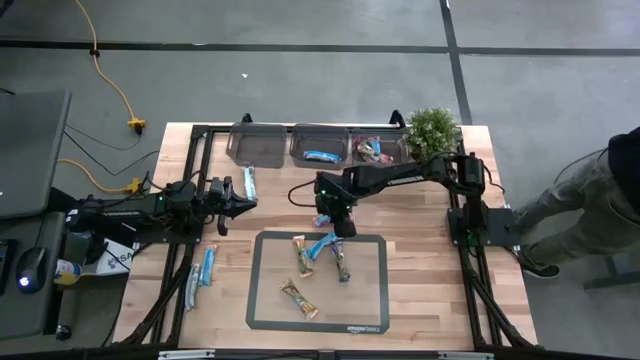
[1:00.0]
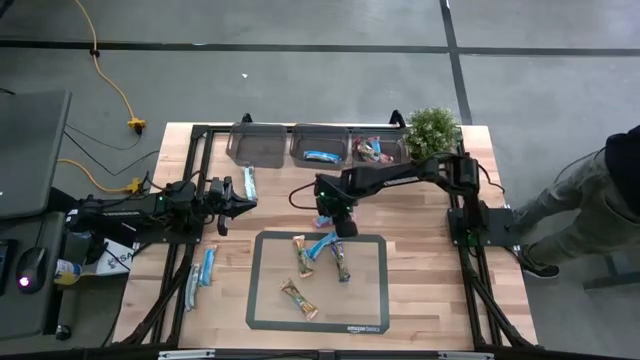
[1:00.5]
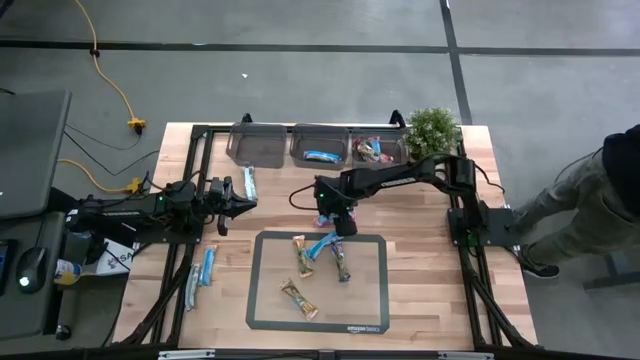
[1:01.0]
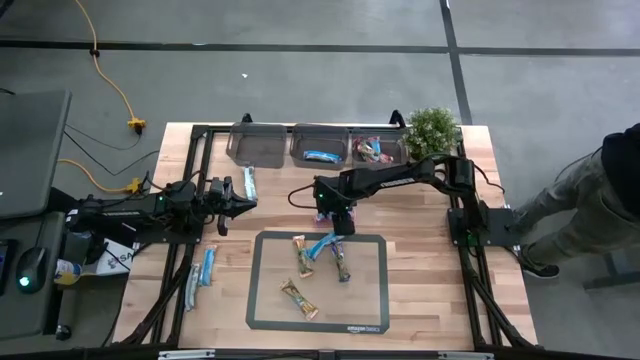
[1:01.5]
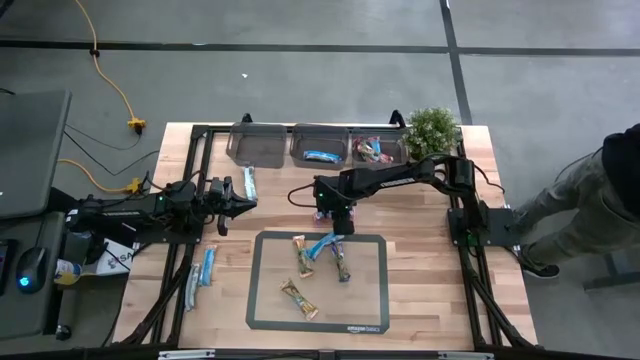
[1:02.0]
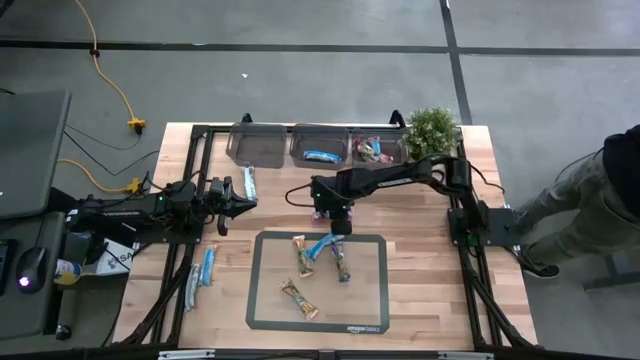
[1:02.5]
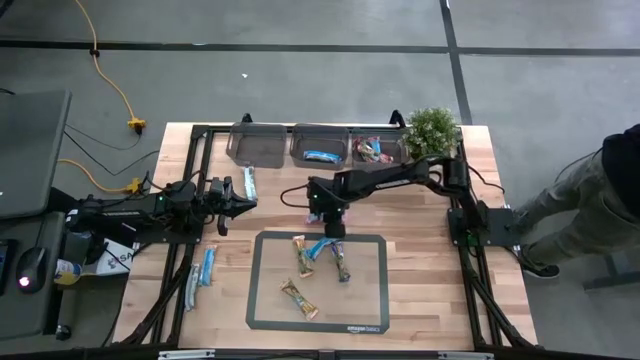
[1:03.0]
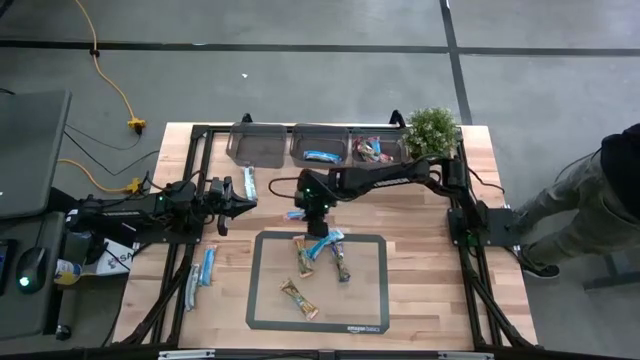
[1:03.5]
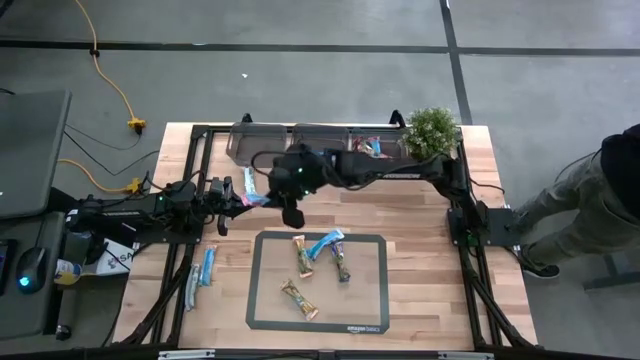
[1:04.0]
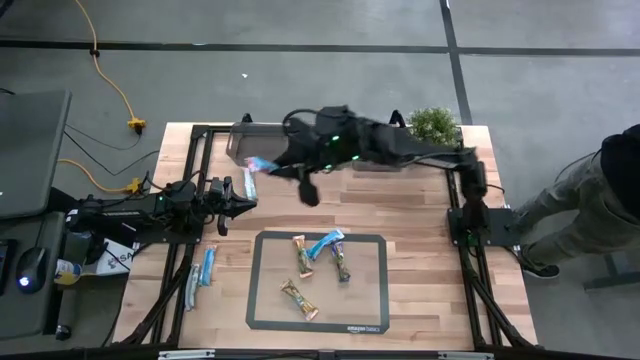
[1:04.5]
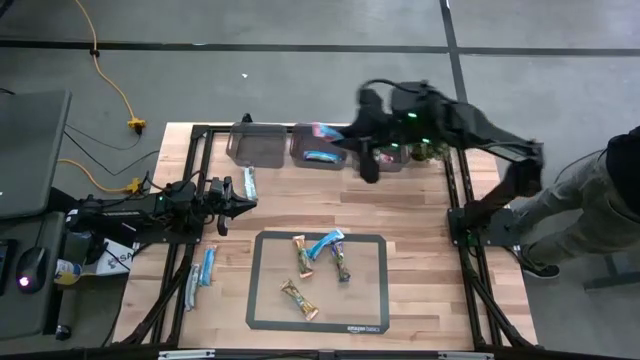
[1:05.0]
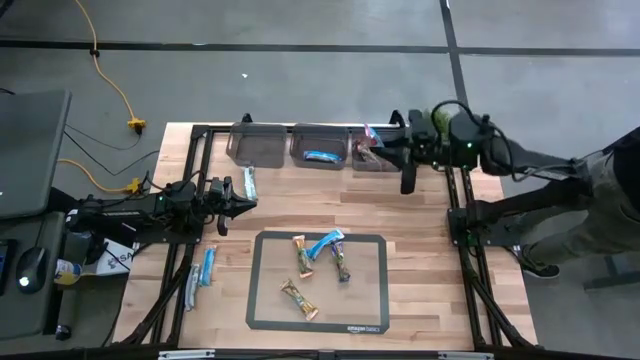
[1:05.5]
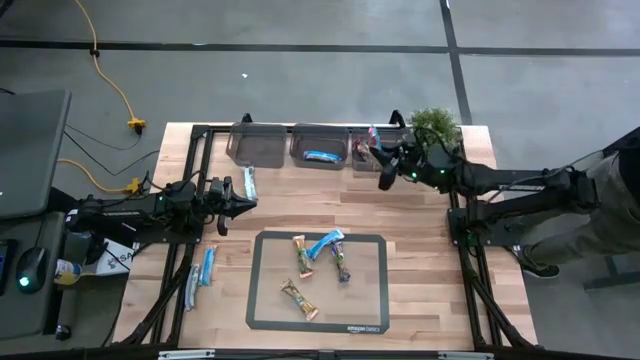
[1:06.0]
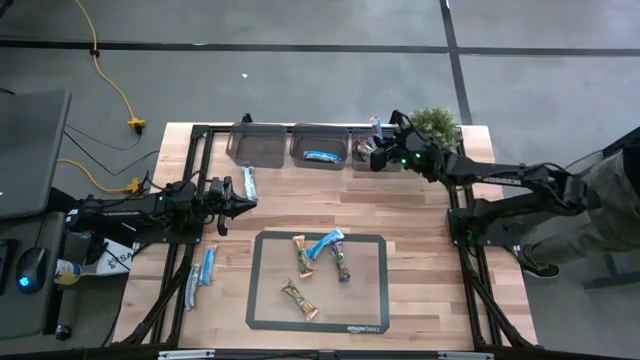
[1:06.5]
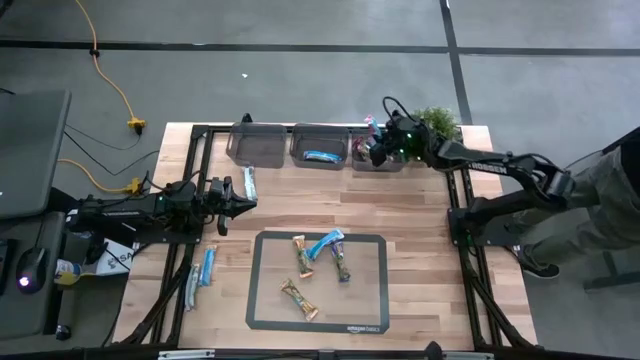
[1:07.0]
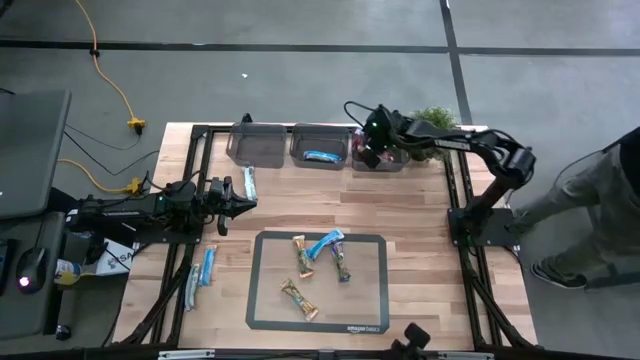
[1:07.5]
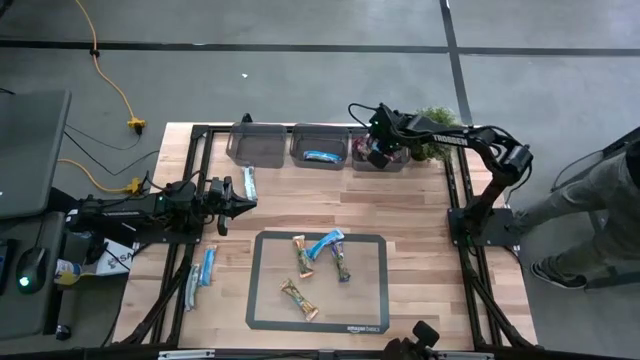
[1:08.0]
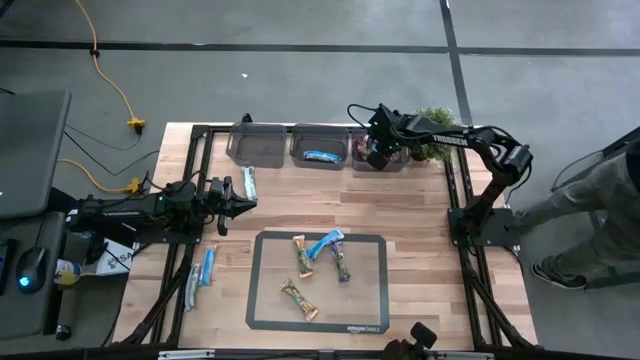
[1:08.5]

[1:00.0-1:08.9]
Task: Pick and place Granola Bars by type
Put the red granola bar into the right black bin

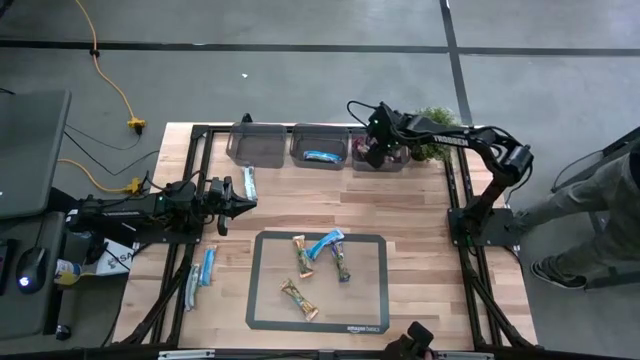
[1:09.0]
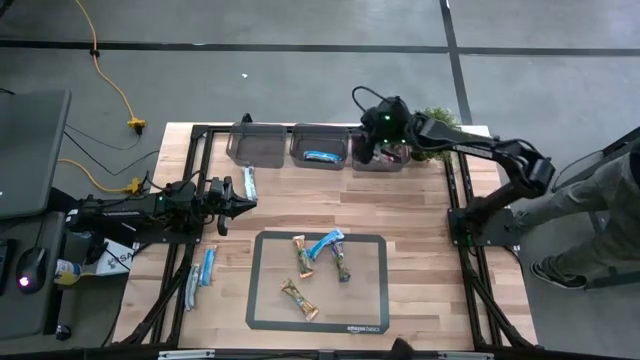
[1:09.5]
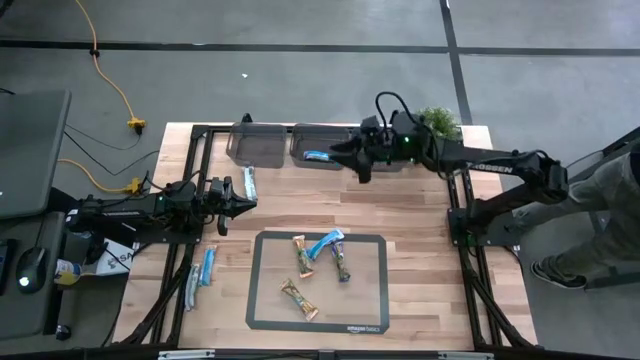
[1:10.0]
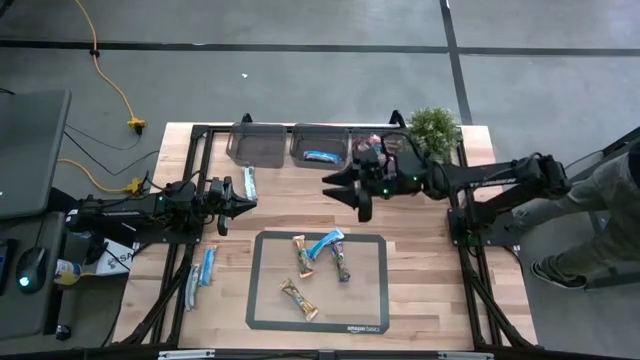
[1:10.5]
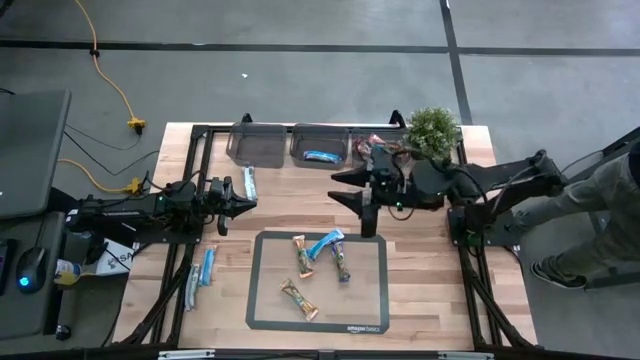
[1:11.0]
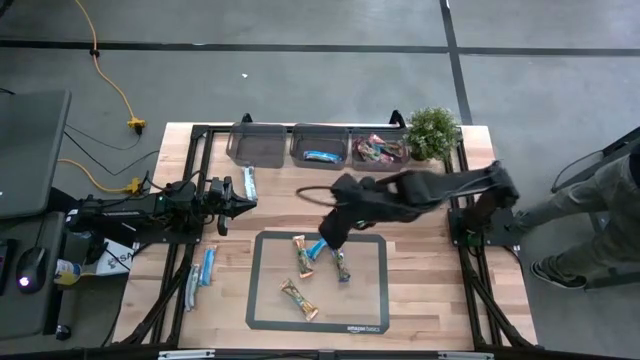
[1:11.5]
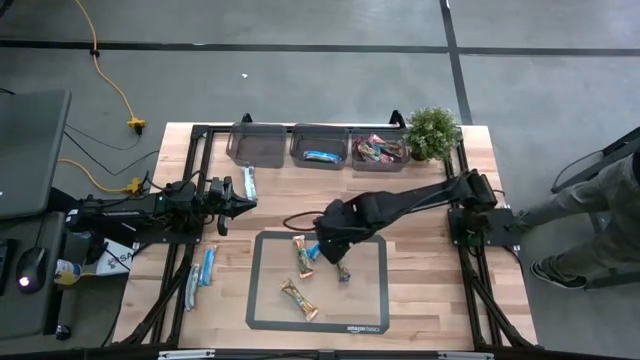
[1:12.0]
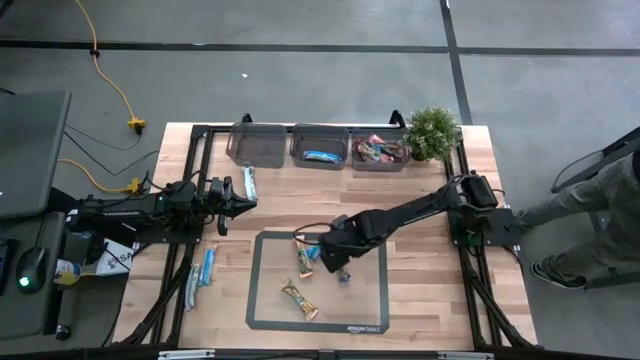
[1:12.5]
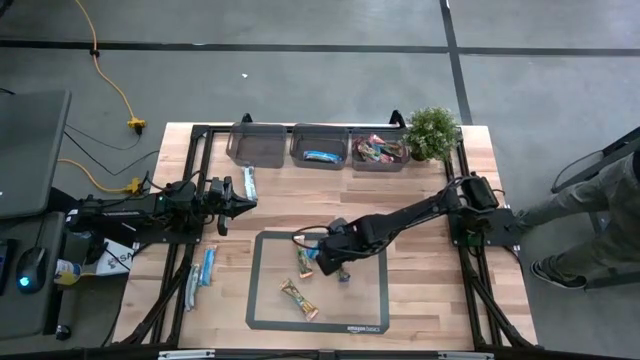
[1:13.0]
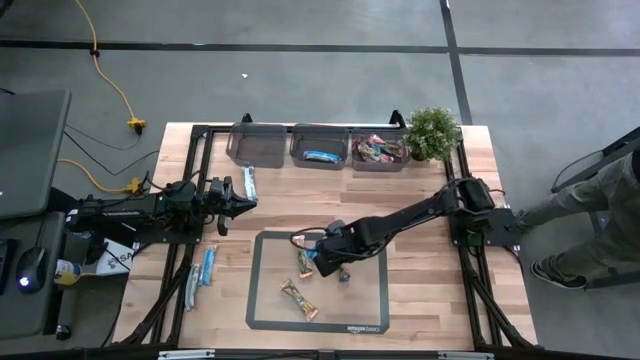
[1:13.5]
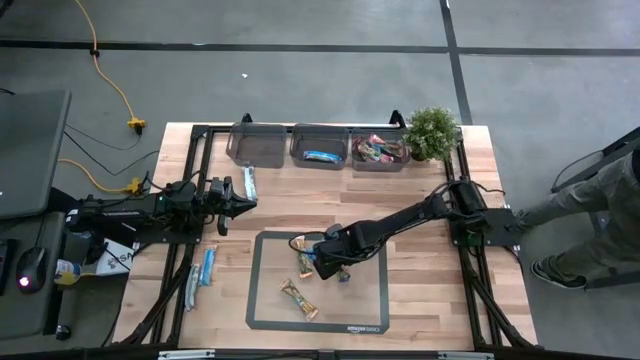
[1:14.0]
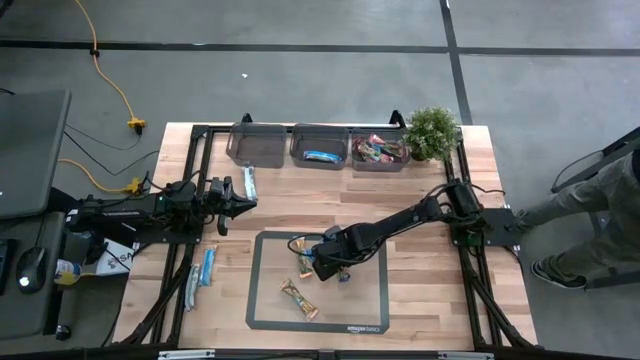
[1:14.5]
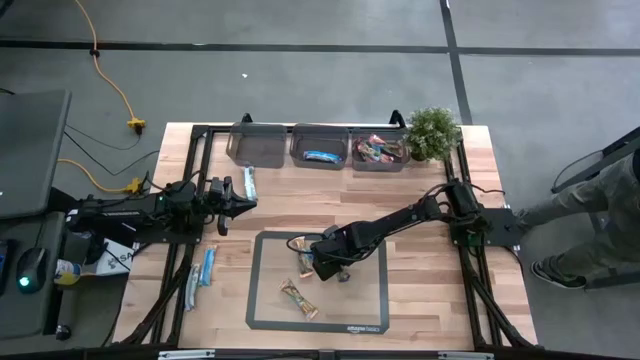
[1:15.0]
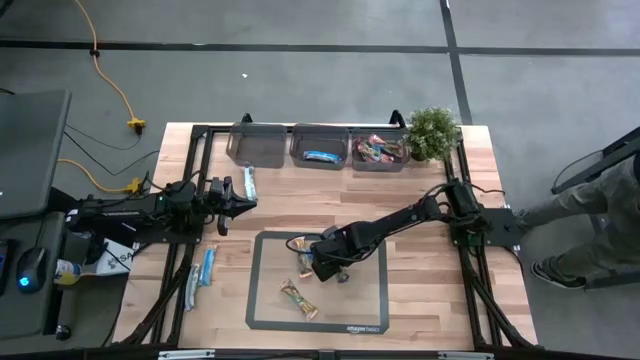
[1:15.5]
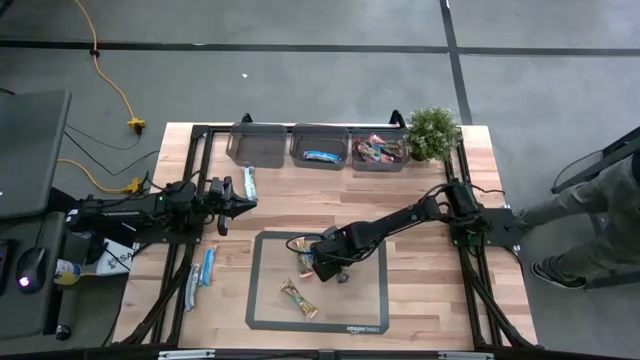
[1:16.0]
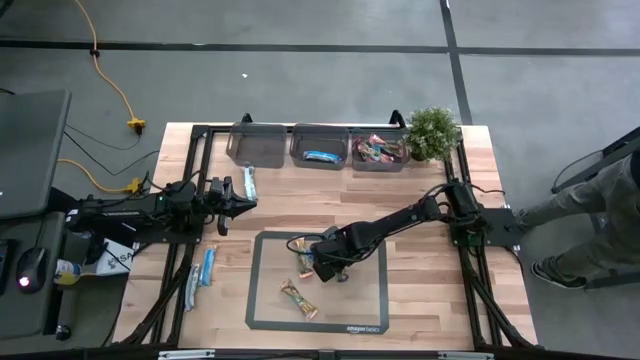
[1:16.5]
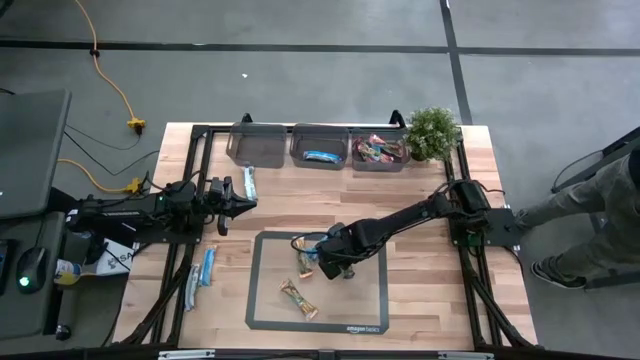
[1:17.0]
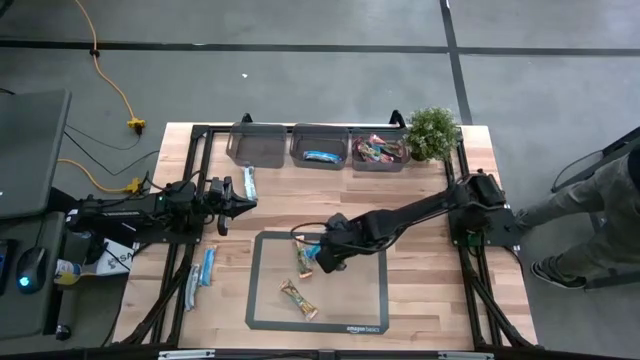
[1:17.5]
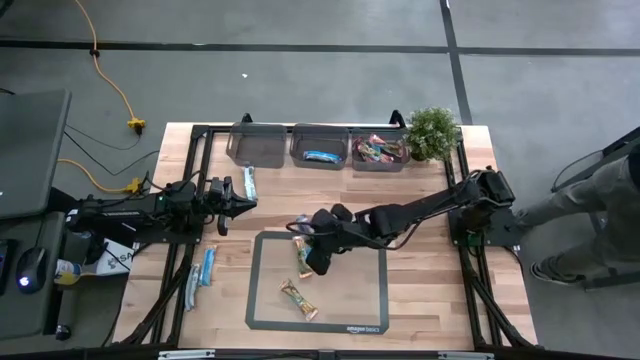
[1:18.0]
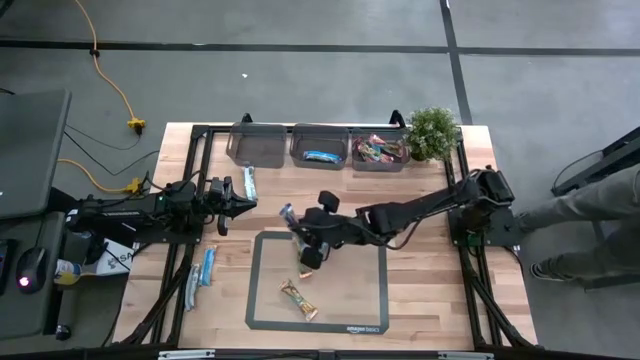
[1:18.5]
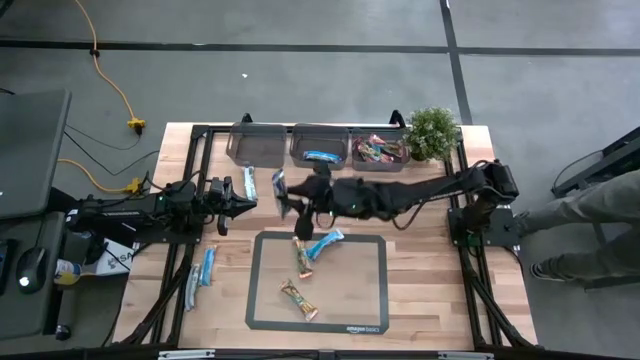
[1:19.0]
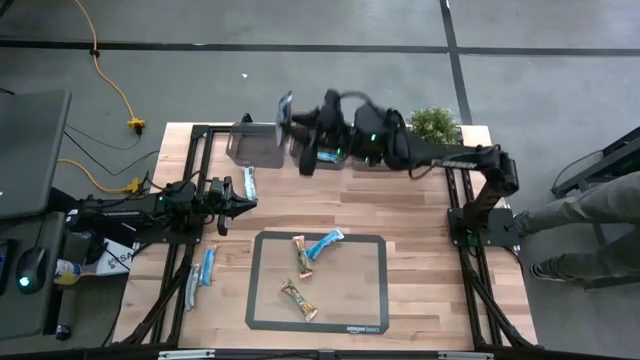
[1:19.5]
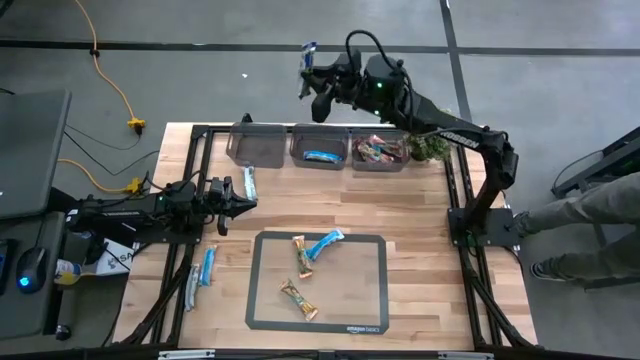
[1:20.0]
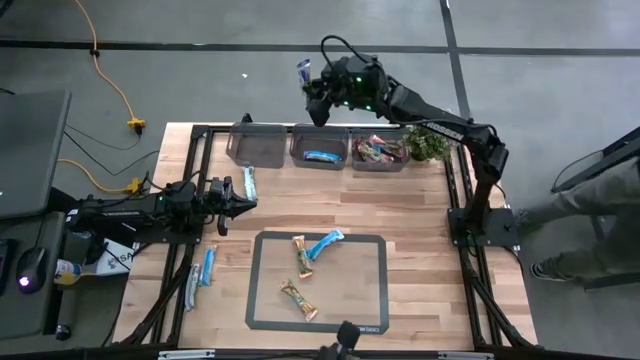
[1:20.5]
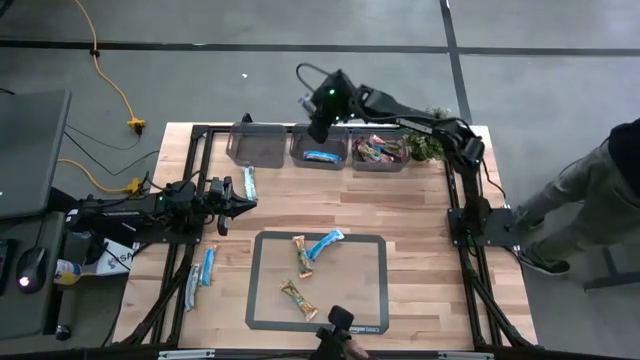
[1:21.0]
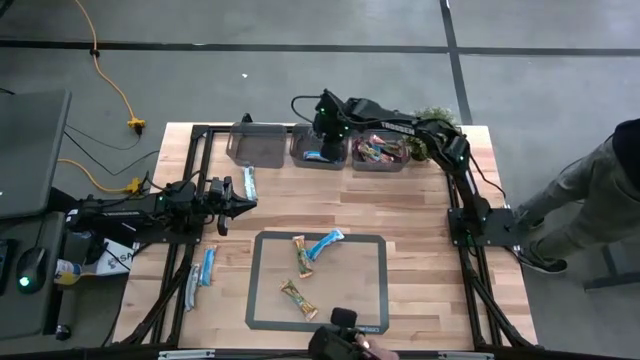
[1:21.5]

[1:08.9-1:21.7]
Put the blue granola bar into the middle black bin
